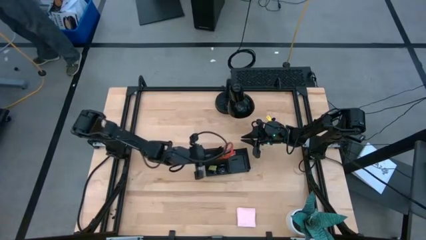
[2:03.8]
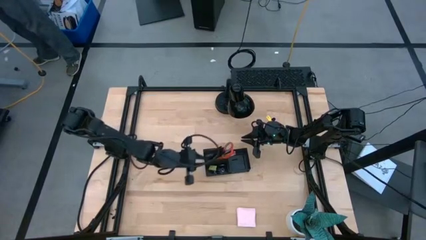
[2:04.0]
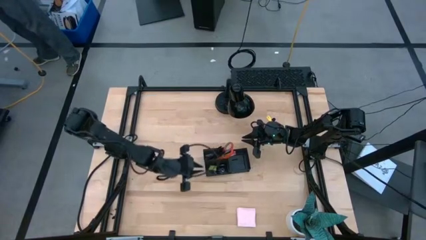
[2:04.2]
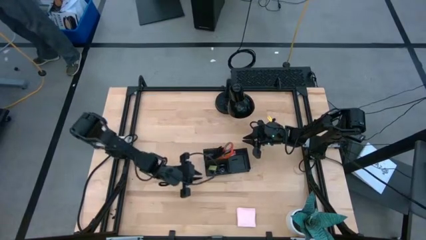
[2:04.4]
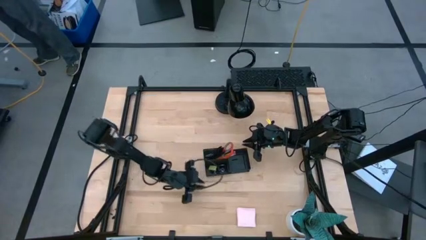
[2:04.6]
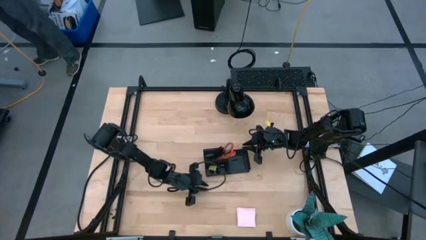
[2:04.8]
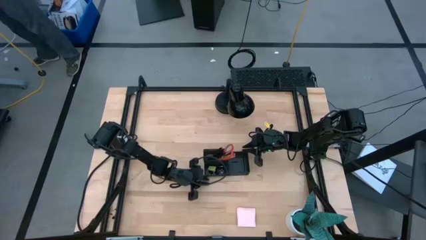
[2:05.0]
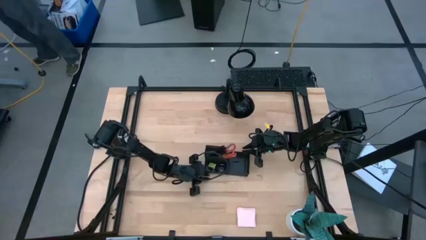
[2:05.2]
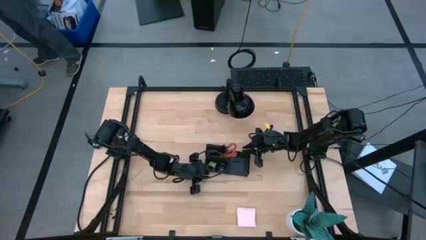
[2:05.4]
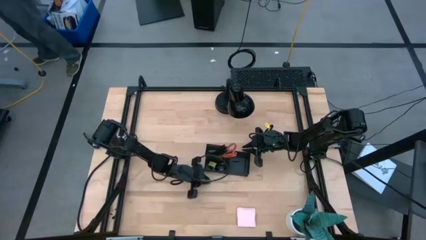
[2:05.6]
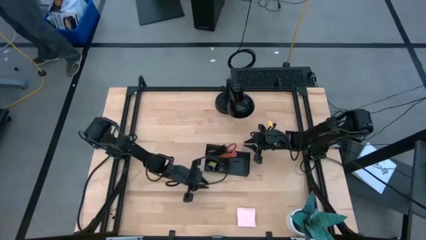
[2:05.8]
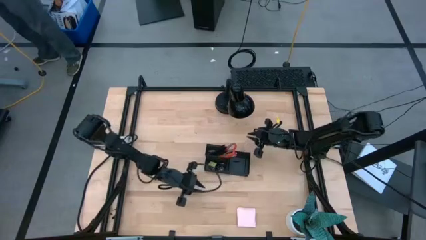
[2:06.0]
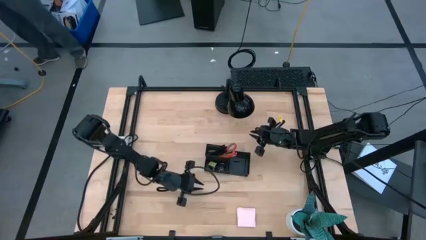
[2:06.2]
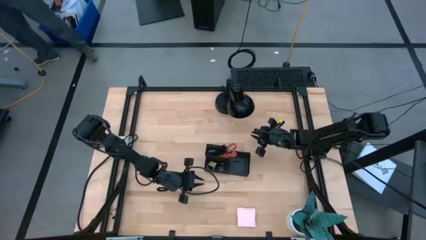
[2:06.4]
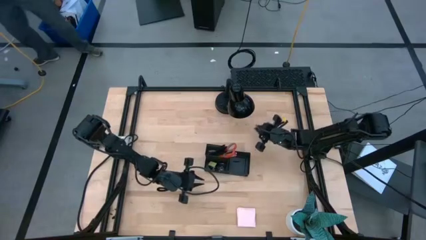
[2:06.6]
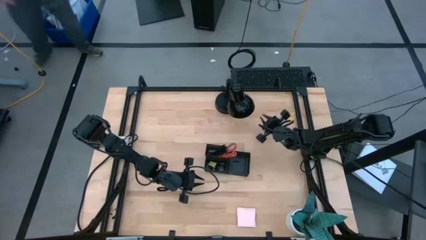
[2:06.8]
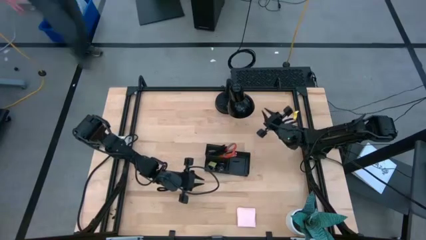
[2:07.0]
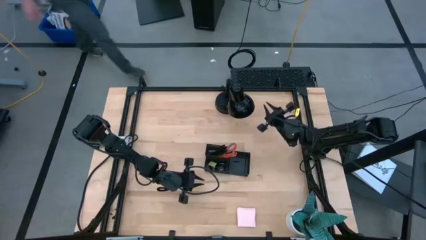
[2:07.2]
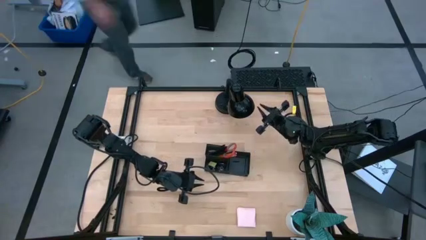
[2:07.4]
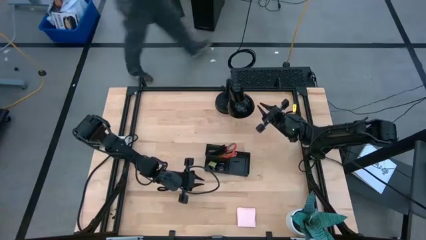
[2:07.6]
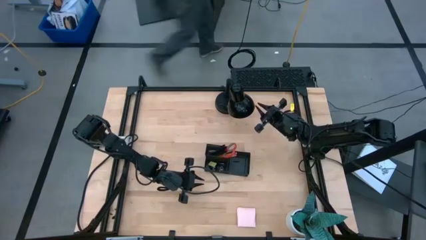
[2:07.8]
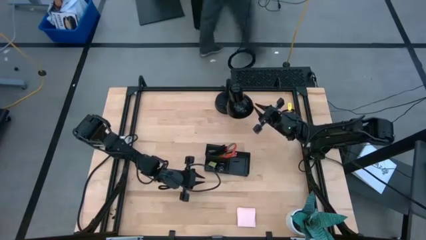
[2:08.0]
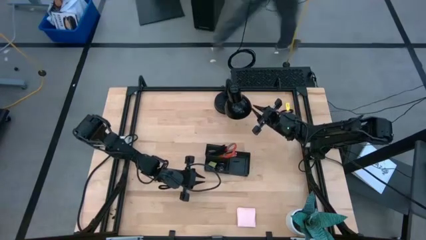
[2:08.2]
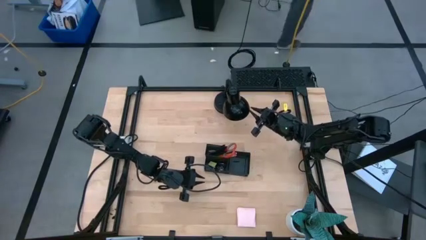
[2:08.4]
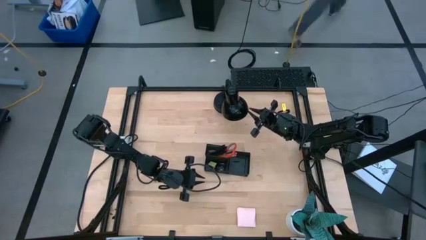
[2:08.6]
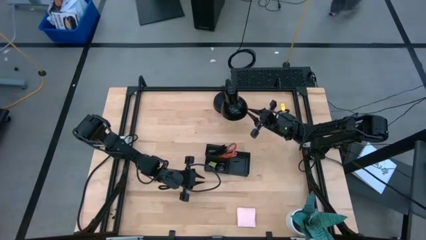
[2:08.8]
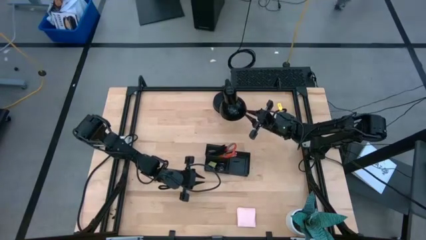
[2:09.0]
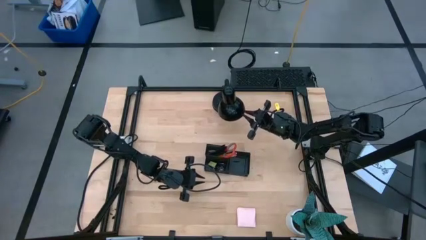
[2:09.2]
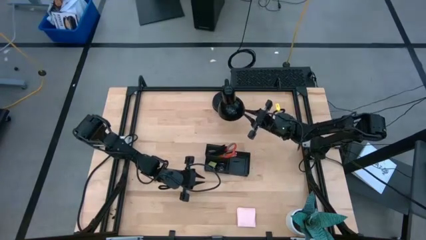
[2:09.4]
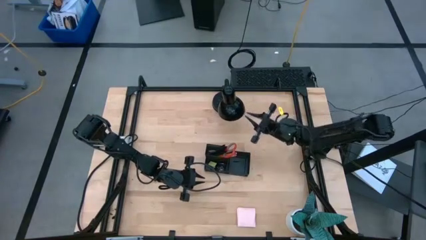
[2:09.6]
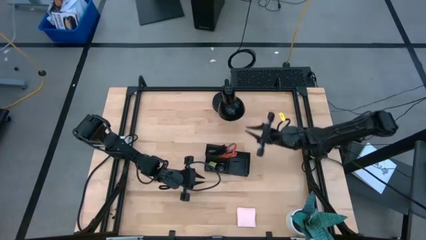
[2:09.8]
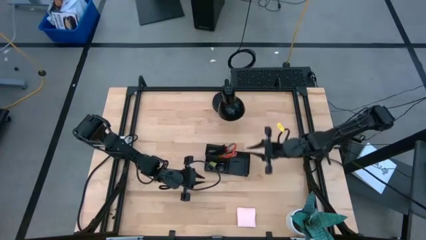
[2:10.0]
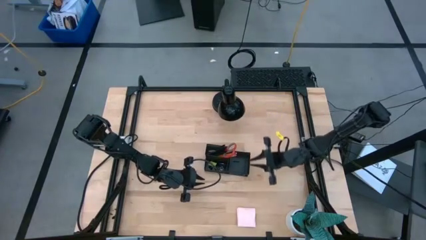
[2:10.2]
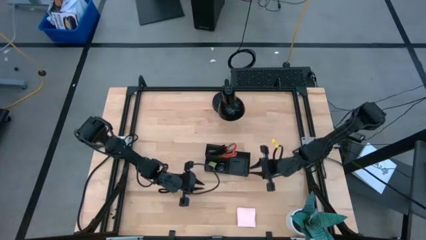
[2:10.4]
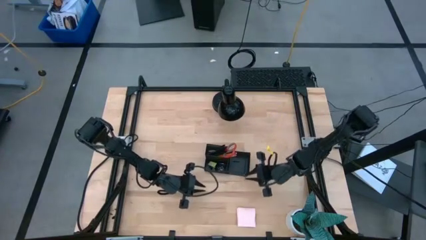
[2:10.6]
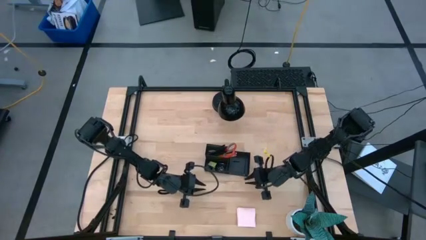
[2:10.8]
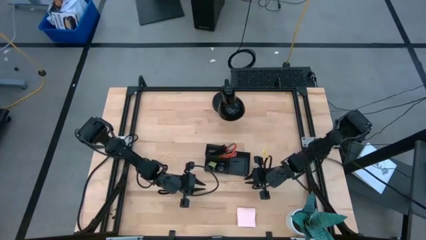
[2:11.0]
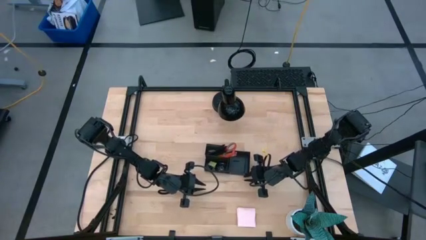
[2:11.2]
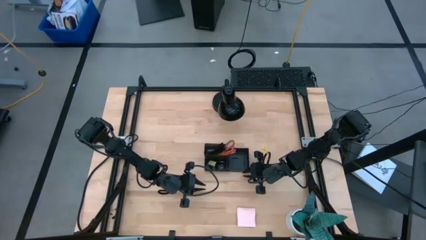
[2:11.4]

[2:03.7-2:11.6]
Task: Pick and place office supplies into organizer
Adjust the black desk organizer

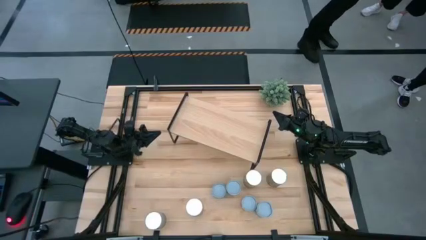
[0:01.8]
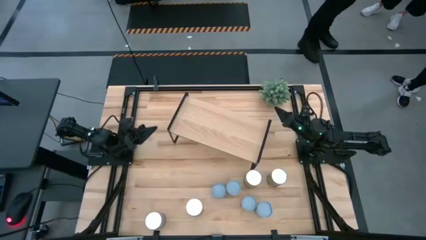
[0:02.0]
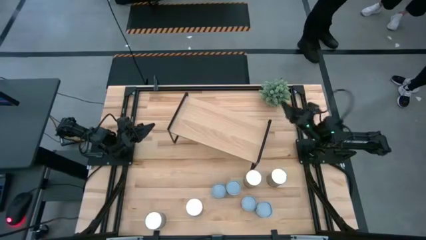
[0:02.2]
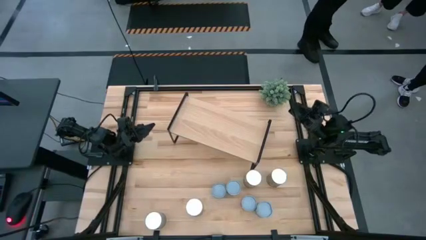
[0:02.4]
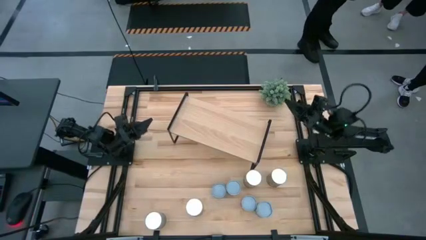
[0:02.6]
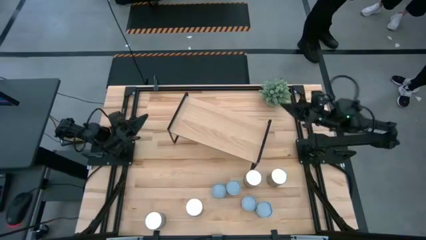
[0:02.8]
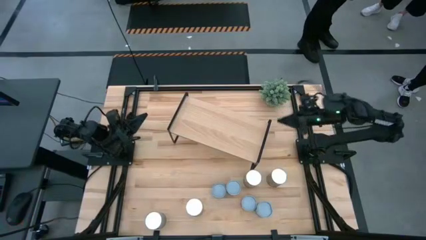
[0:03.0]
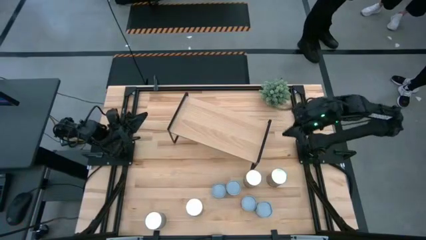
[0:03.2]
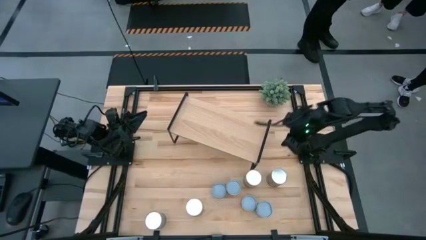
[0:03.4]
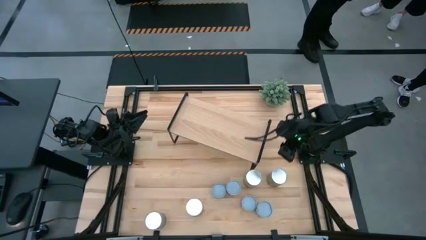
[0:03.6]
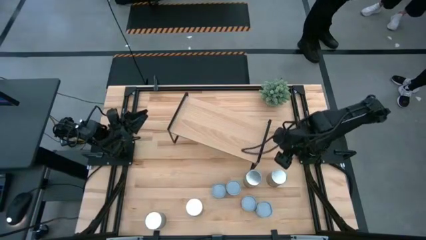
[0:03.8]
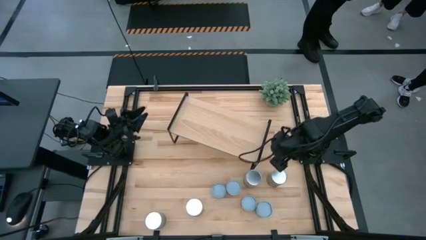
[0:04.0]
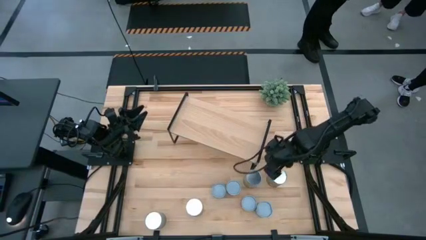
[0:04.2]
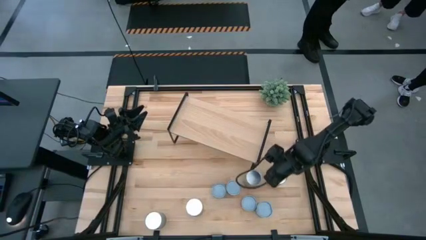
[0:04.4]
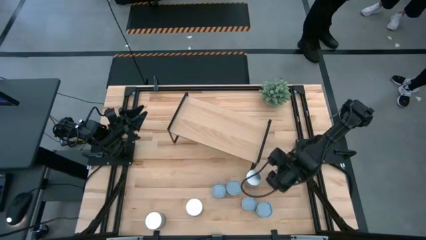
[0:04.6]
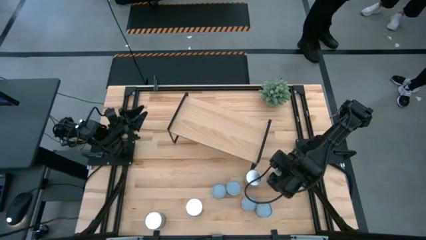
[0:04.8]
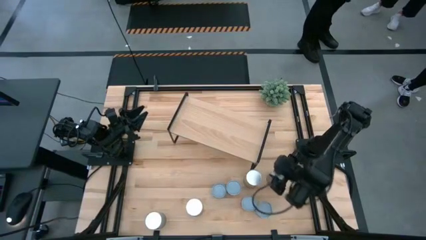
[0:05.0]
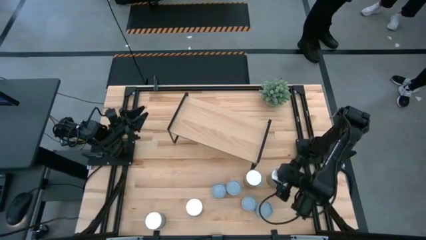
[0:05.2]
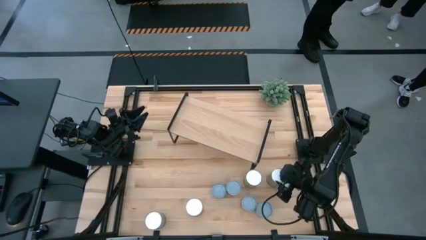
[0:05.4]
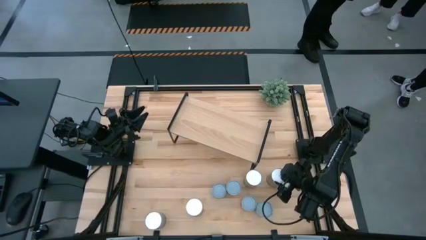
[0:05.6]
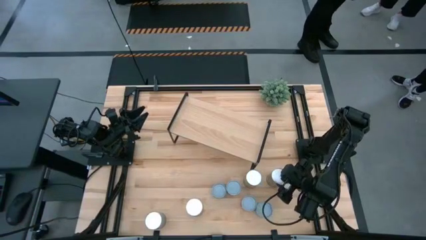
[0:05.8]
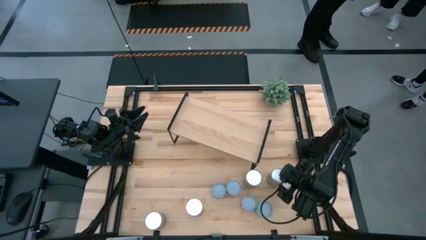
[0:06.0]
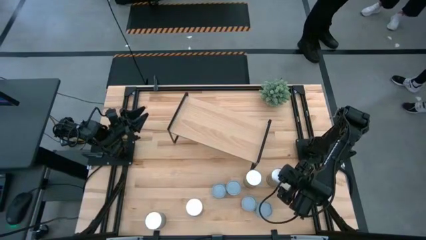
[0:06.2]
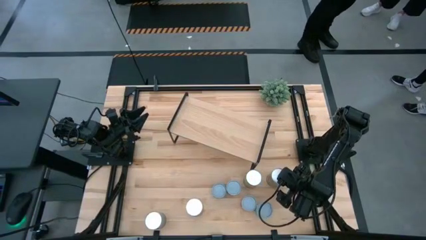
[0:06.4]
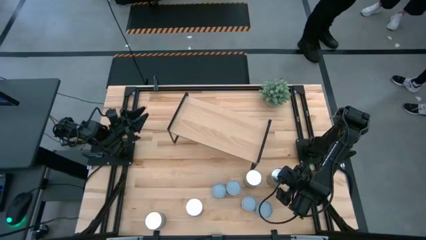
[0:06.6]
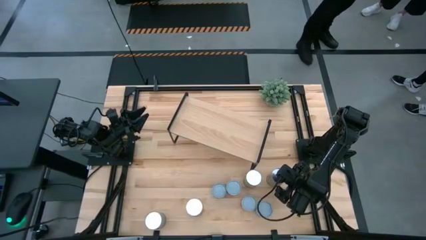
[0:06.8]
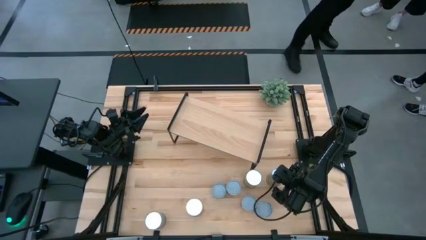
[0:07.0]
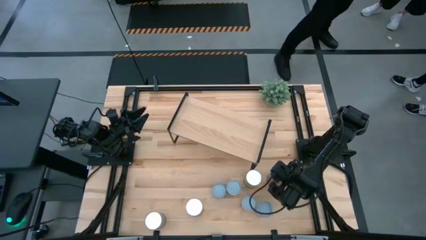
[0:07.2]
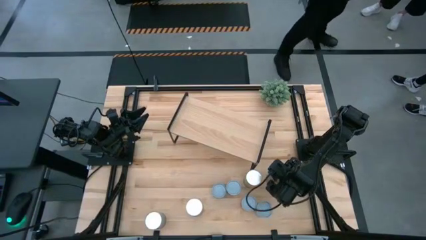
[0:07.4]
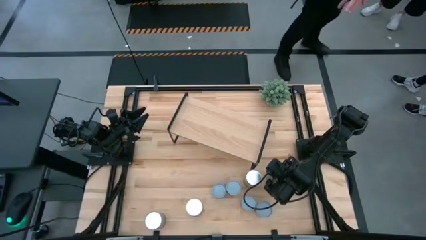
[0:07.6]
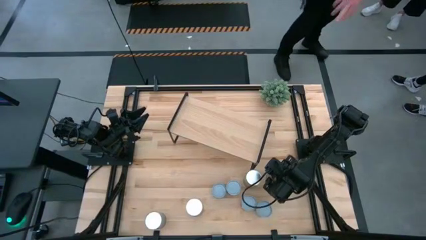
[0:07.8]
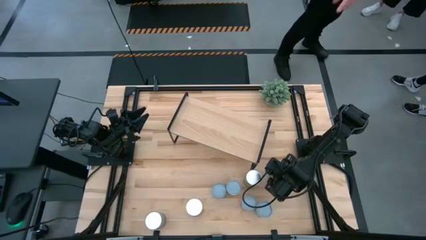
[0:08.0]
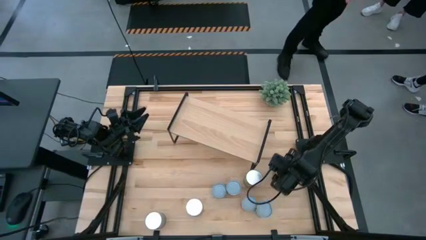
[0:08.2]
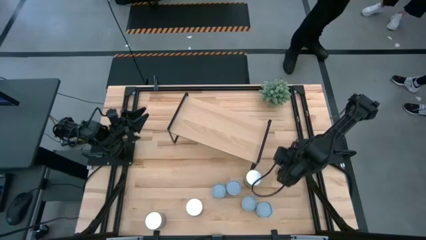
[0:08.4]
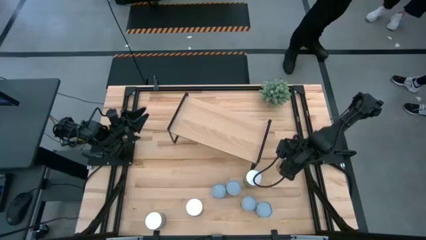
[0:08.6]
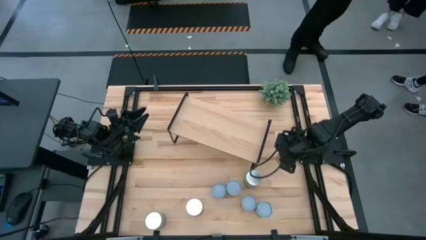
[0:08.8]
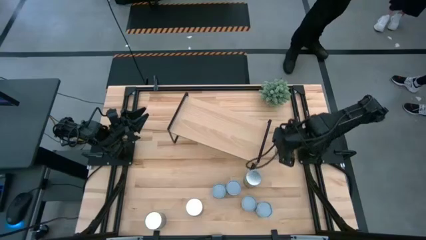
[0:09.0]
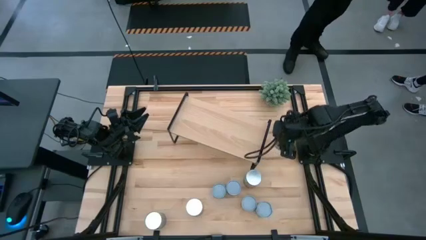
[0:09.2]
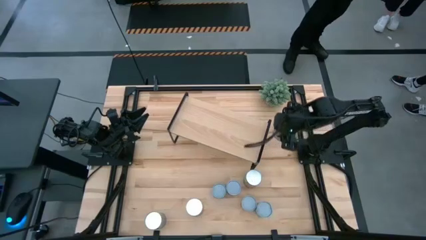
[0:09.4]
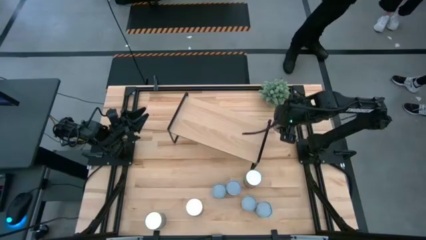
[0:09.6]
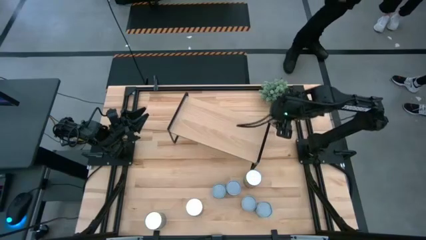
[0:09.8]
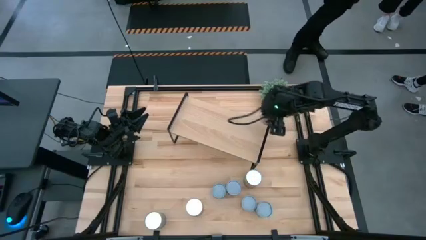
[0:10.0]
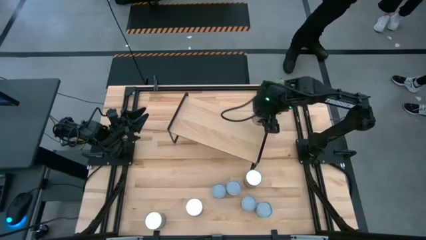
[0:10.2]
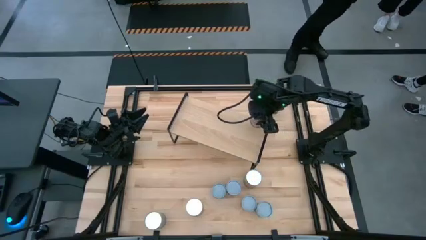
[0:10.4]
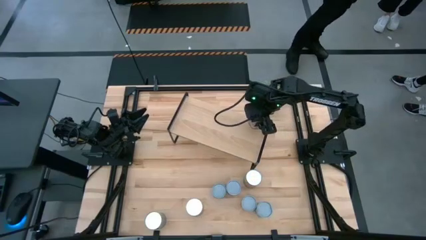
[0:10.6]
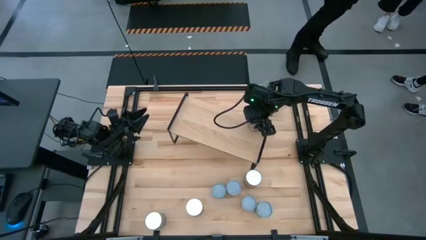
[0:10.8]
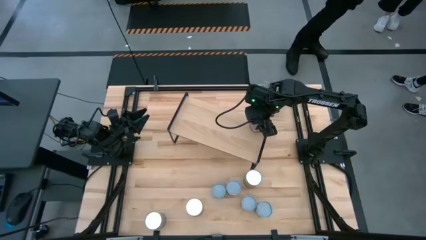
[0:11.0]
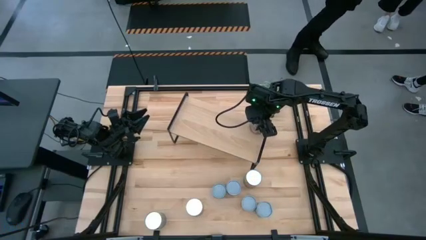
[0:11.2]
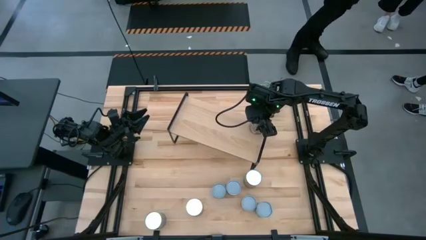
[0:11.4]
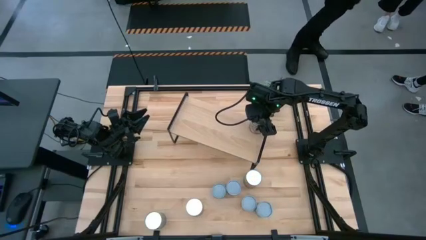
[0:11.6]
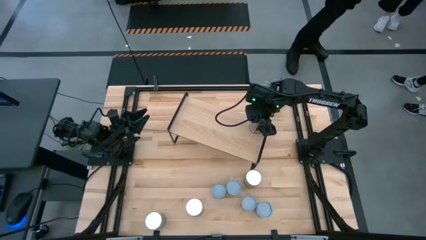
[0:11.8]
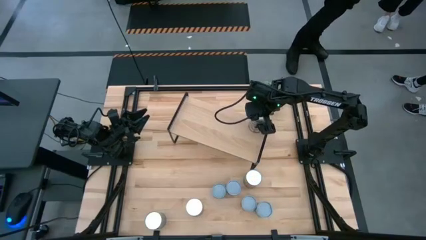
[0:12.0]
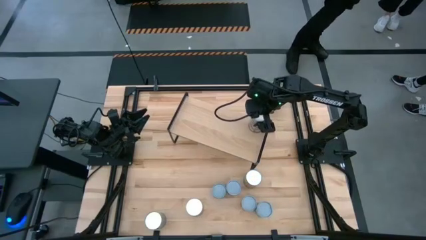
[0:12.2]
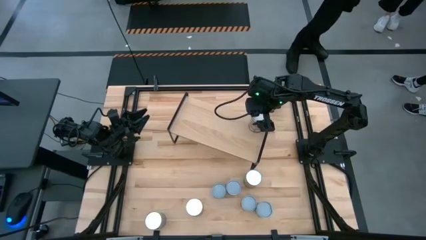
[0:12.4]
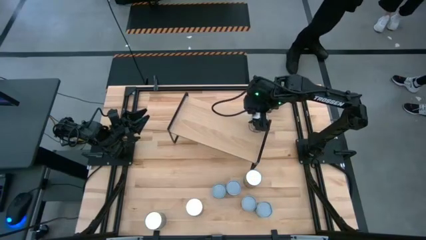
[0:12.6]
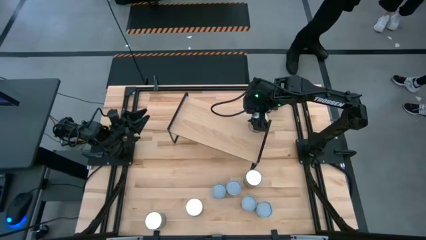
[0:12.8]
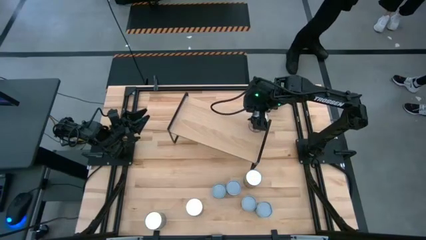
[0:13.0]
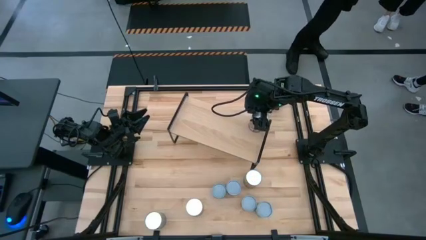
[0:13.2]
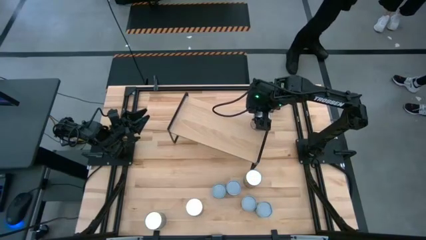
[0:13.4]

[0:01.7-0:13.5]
Task: Pick and place cans onto a shelf
Put the canned peaches on the shelf
